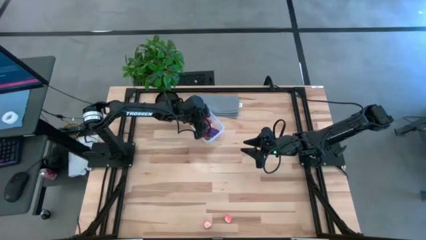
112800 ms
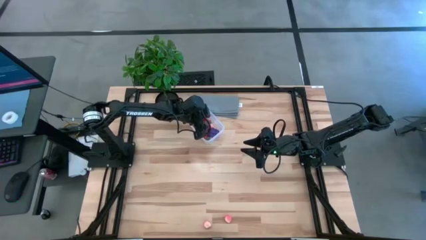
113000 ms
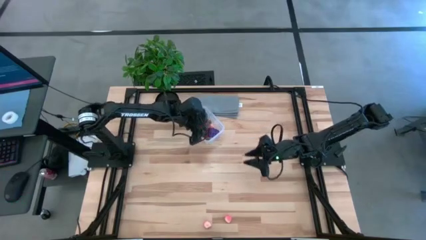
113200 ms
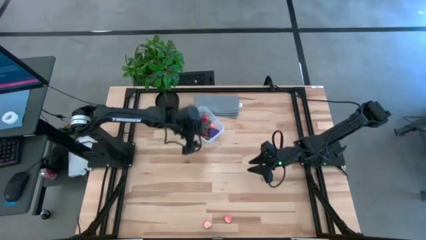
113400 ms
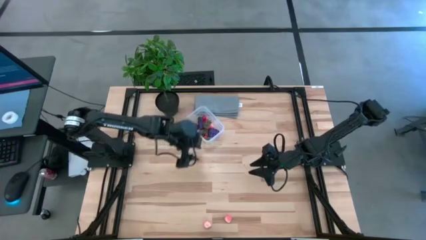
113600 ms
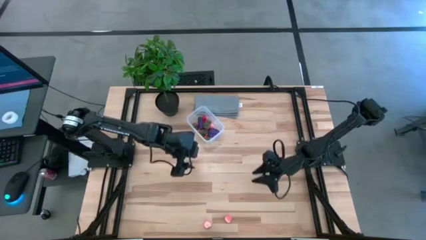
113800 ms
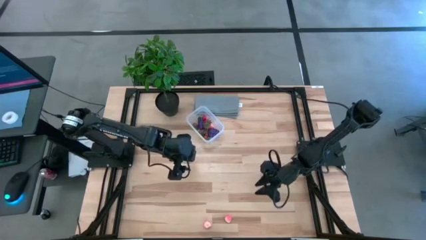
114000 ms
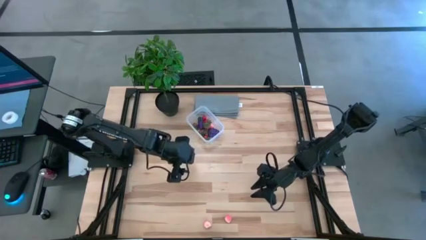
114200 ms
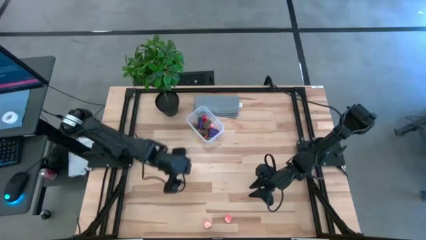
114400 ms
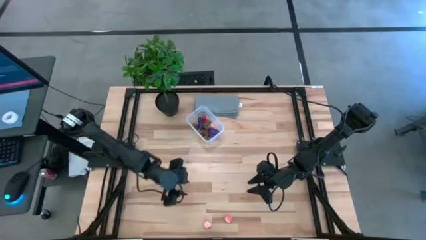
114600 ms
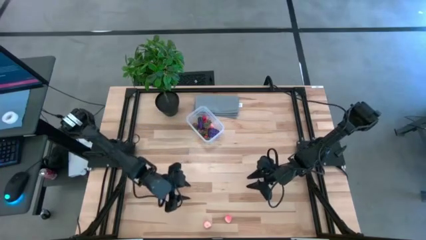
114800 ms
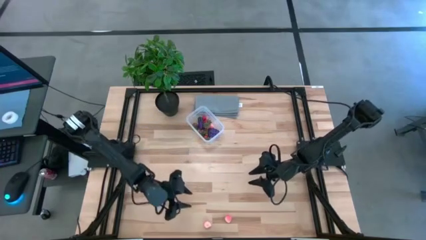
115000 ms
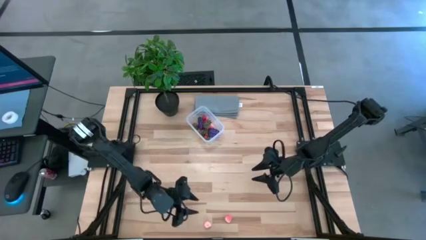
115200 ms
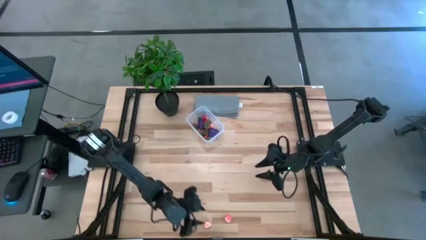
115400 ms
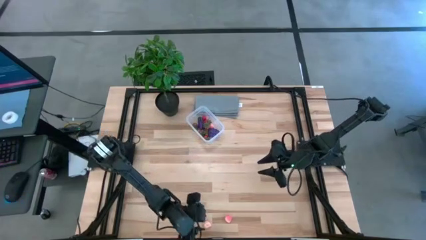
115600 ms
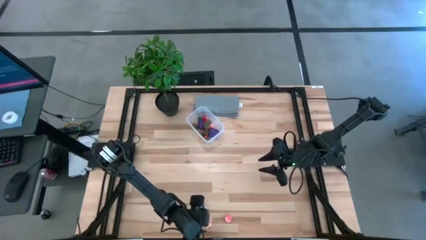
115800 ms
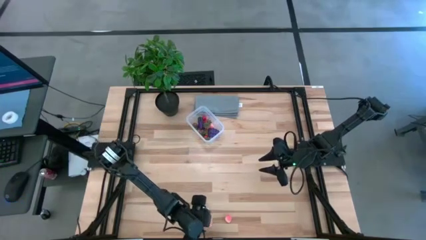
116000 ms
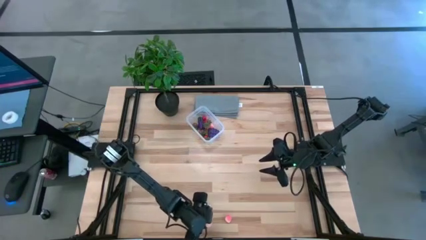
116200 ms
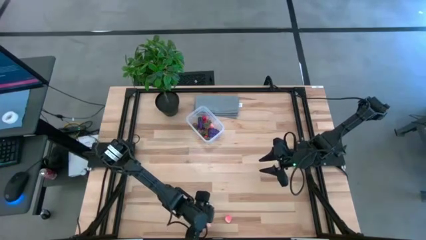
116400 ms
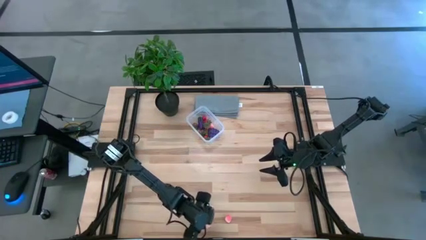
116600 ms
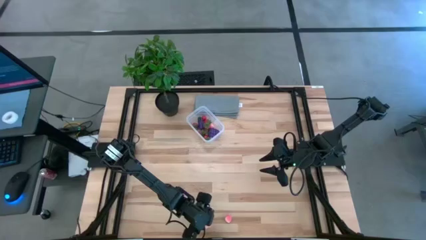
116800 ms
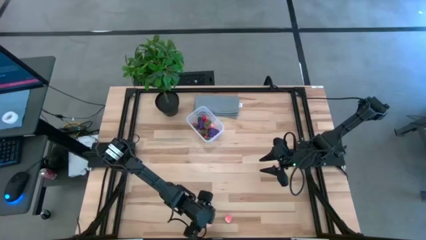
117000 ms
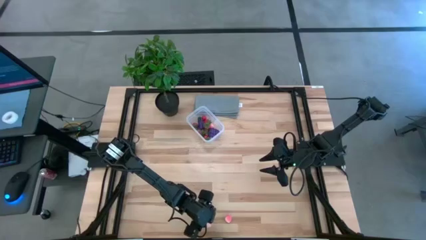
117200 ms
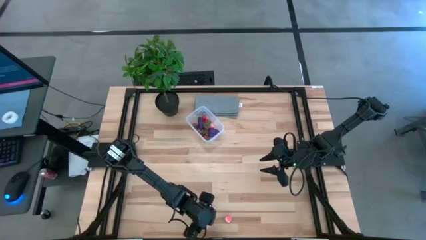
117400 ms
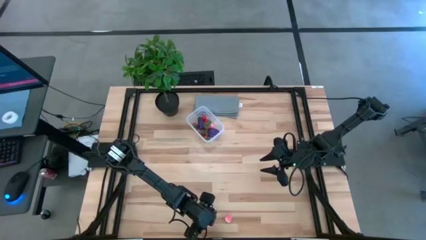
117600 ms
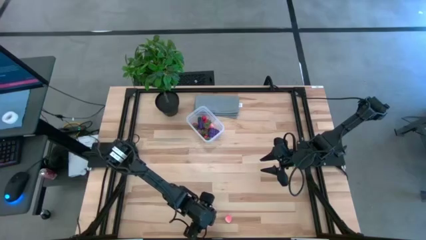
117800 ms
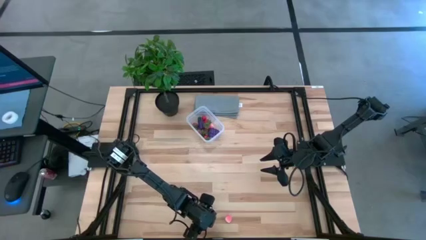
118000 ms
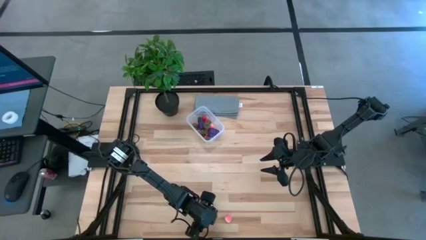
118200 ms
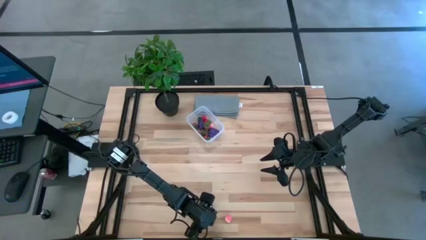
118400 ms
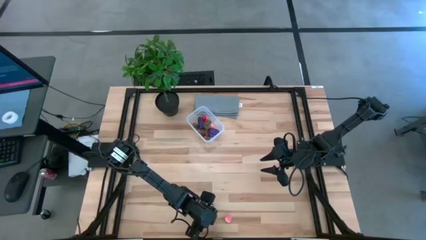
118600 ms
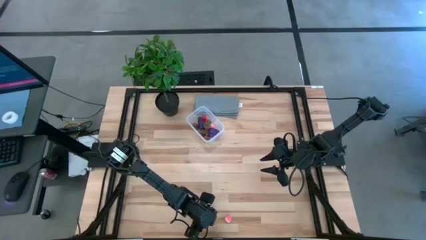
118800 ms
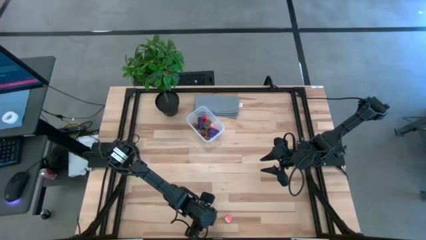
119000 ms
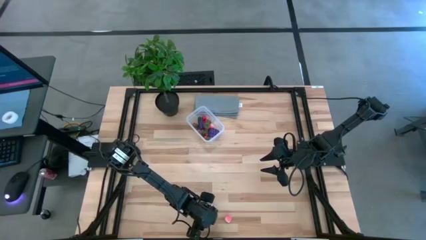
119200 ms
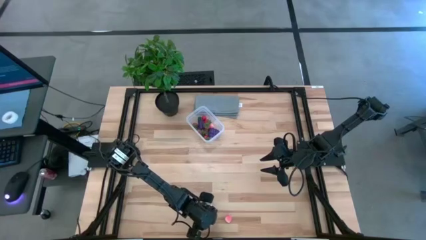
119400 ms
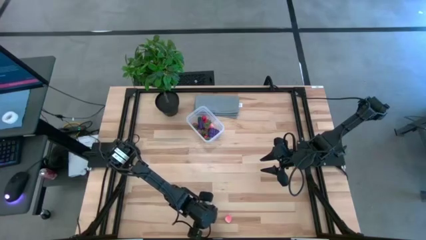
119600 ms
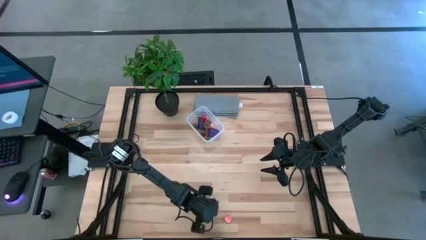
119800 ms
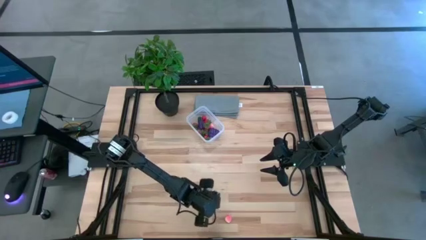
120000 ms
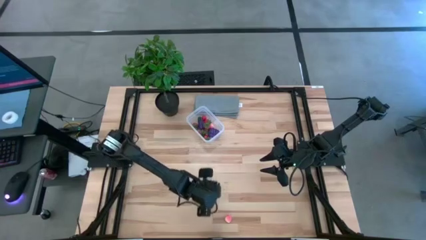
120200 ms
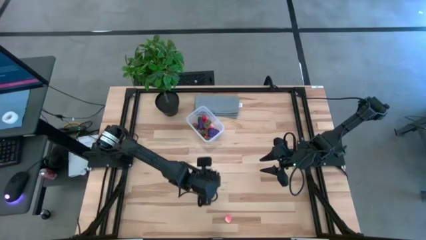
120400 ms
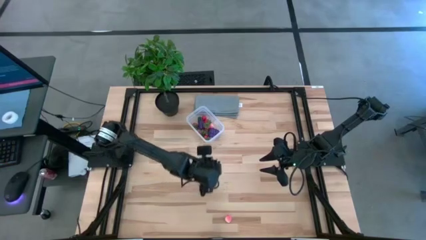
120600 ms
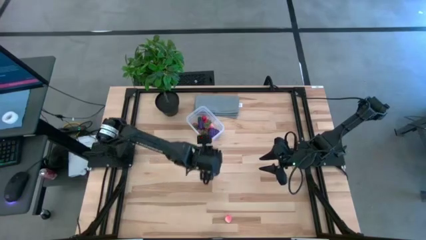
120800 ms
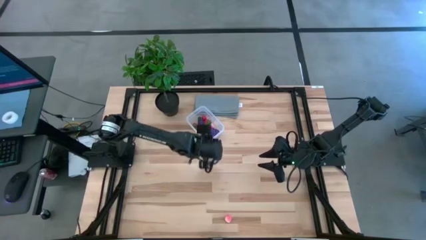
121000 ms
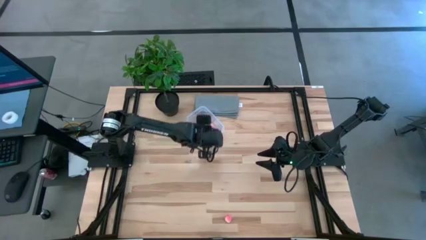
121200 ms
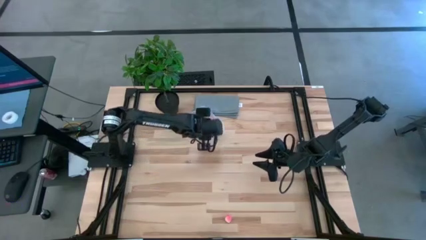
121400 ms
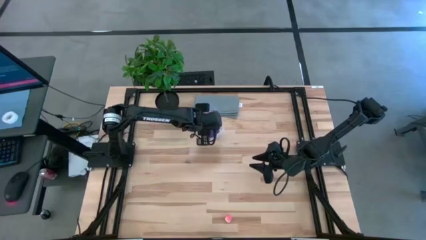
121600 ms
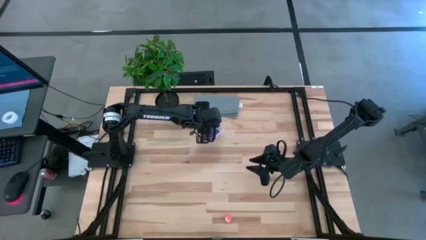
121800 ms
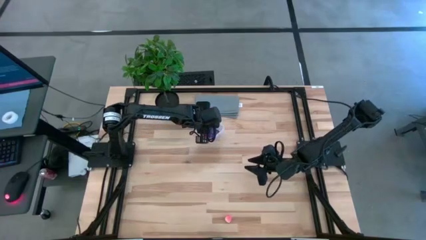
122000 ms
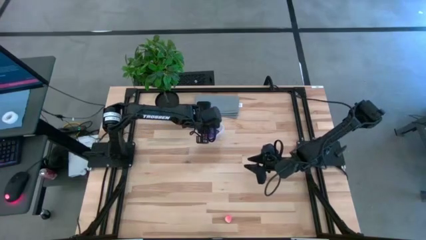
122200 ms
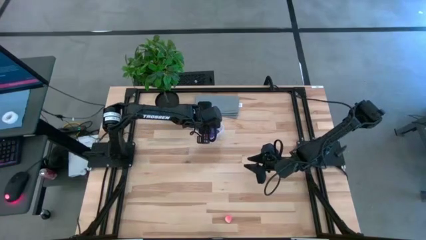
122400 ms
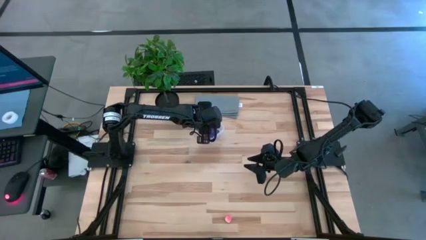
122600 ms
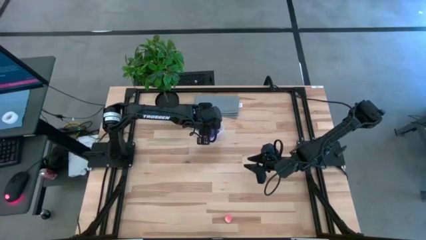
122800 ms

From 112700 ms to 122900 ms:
Task: Pick and placing Produce into tupperware
Put the pink peach into the transparent bin
